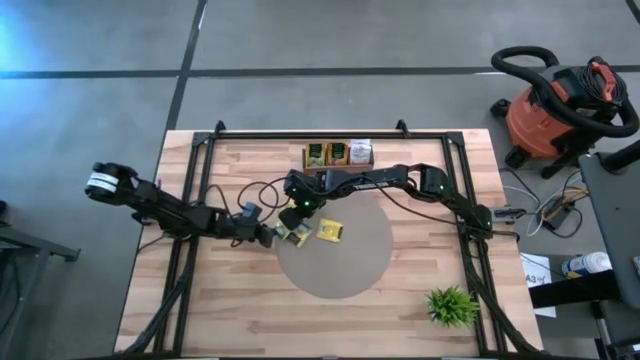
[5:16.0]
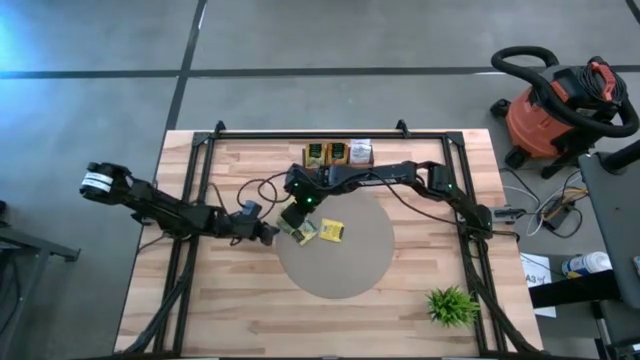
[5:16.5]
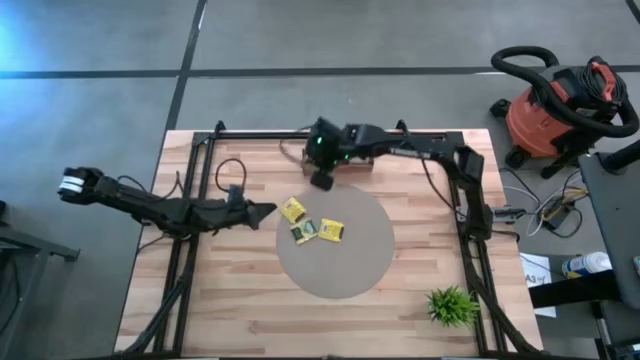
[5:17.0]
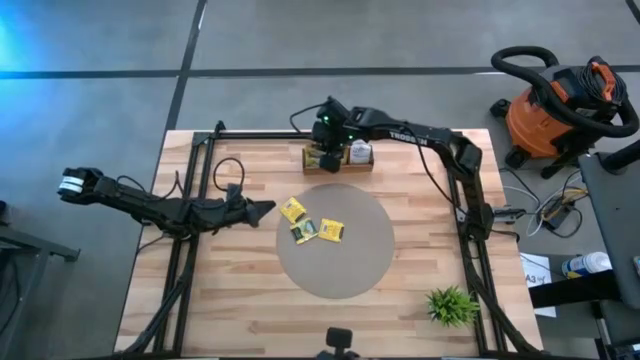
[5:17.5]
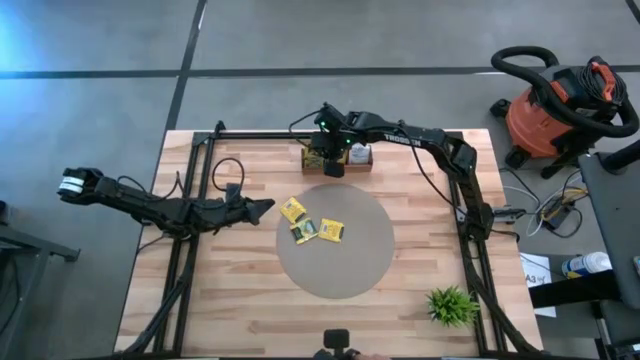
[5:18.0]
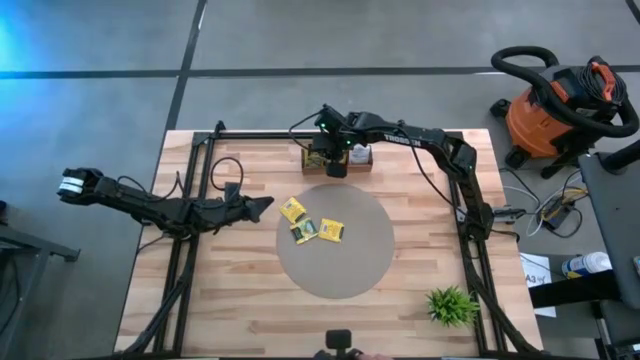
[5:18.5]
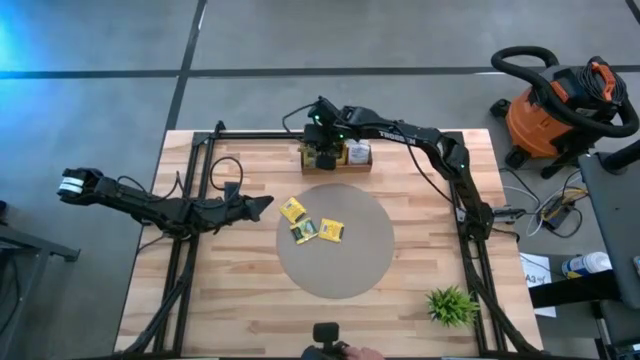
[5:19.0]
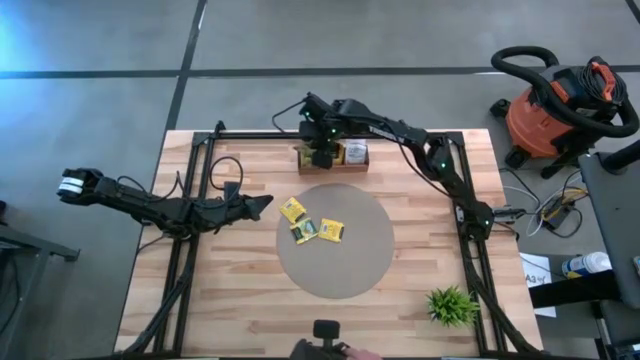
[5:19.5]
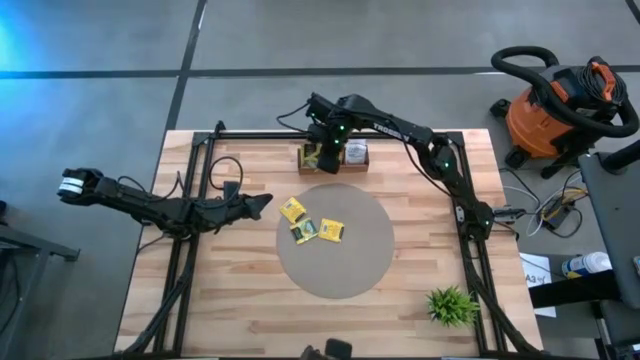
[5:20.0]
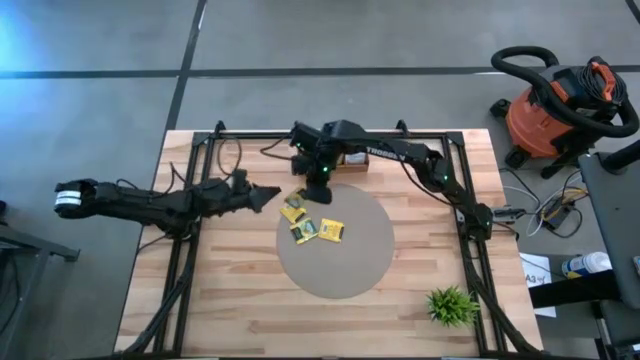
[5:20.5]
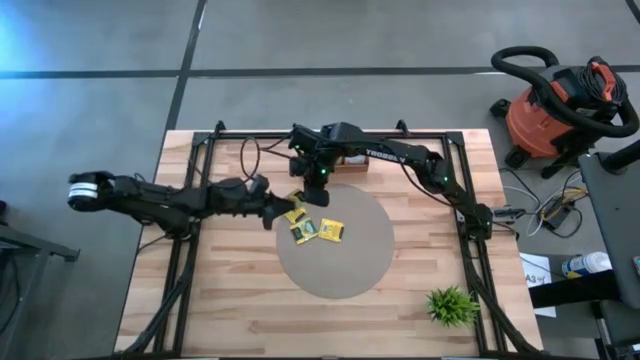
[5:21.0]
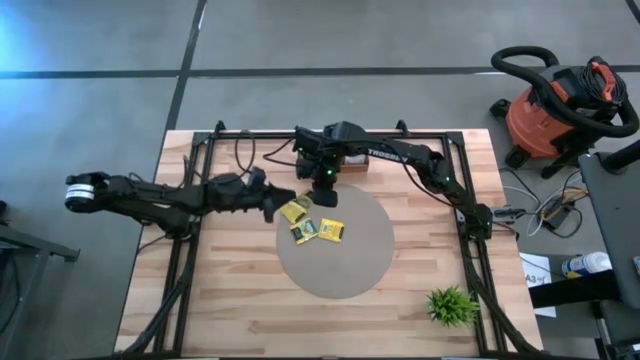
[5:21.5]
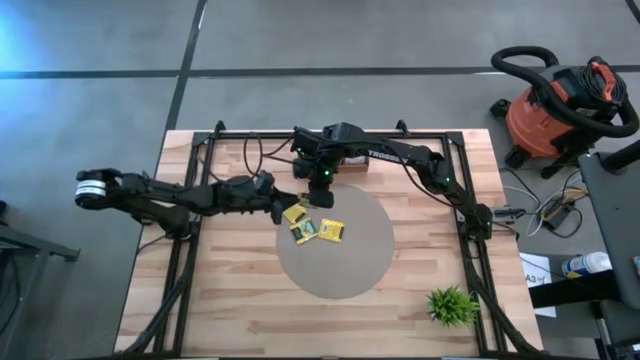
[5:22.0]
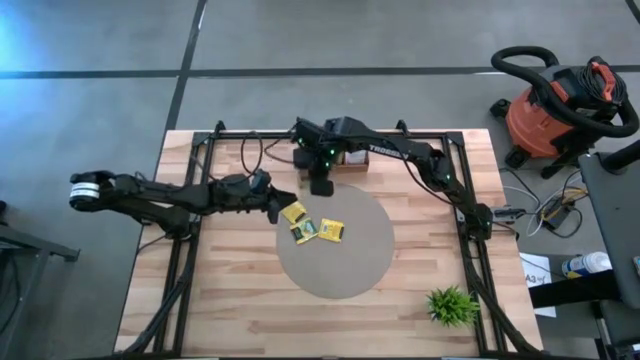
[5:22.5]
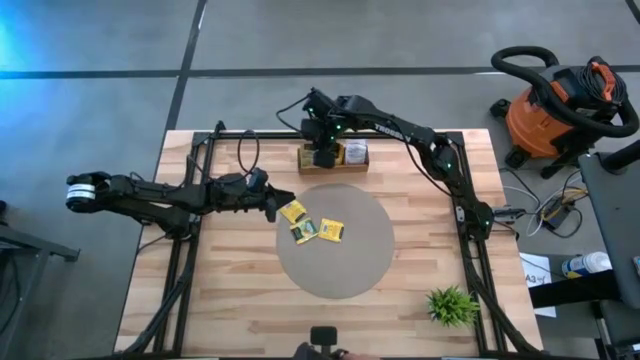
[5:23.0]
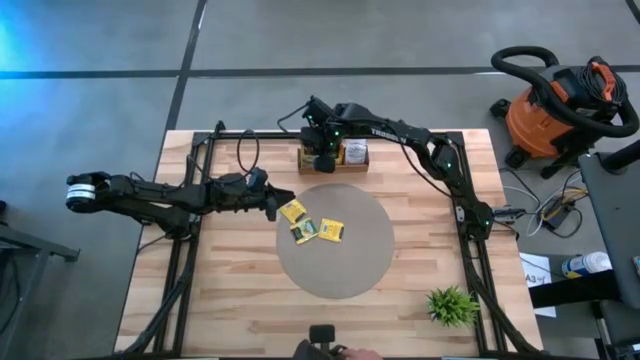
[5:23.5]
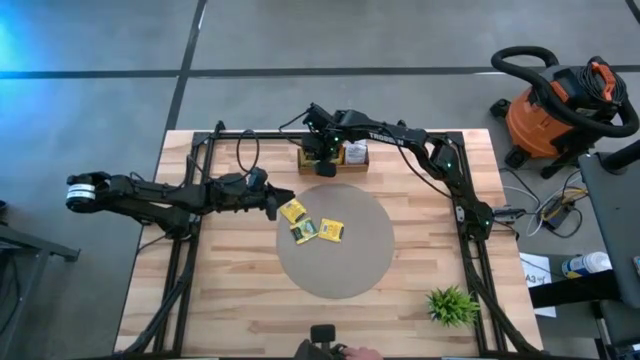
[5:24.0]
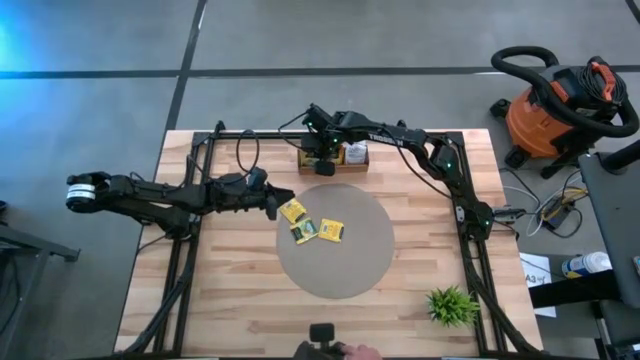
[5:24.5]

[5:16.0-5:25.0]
Task: Pick & Place Tea
Put the yellow tea bag into the left compartment of the wooden organizer

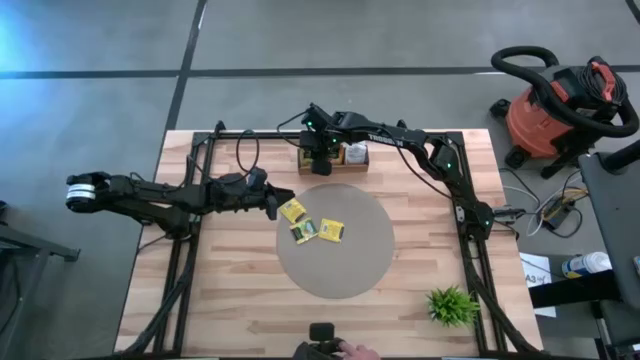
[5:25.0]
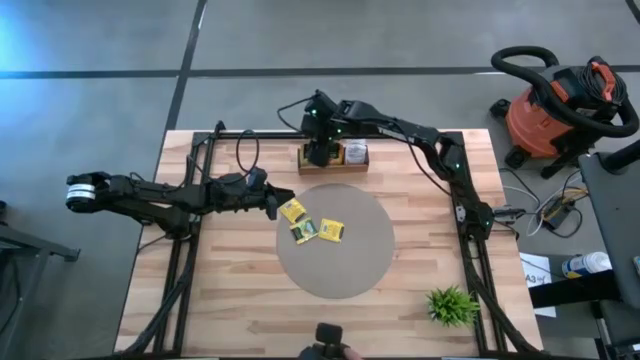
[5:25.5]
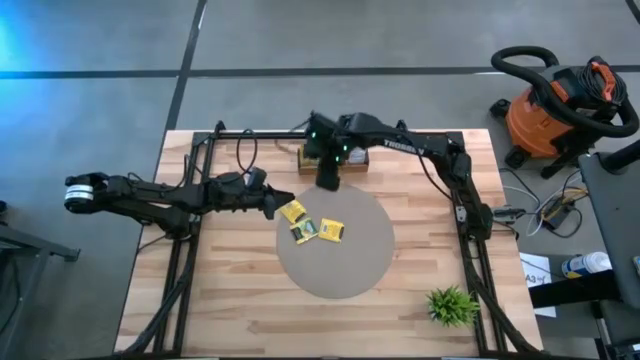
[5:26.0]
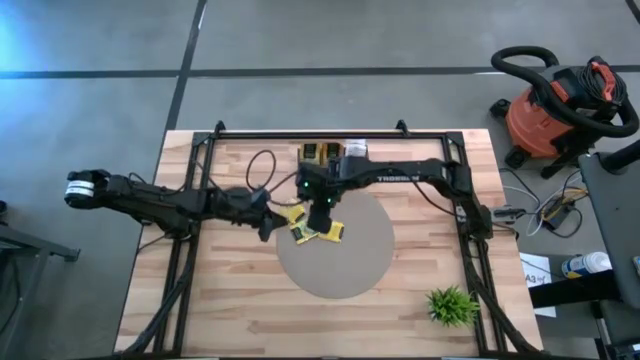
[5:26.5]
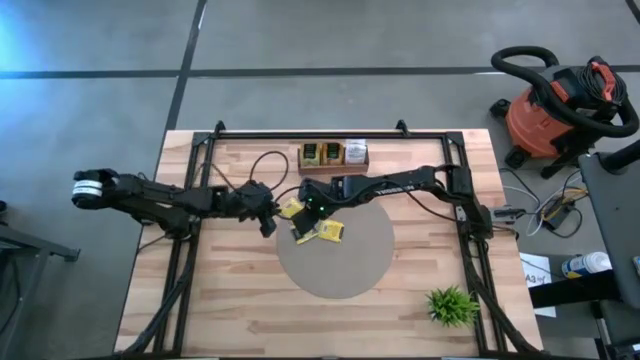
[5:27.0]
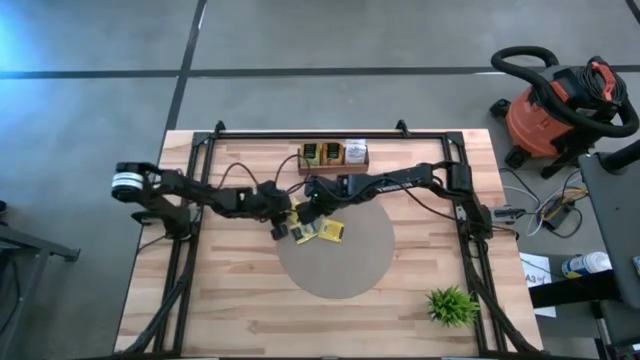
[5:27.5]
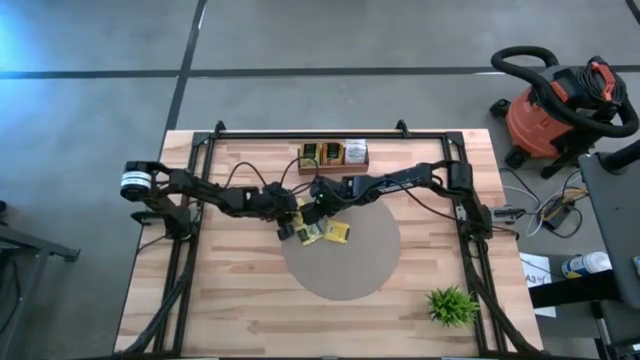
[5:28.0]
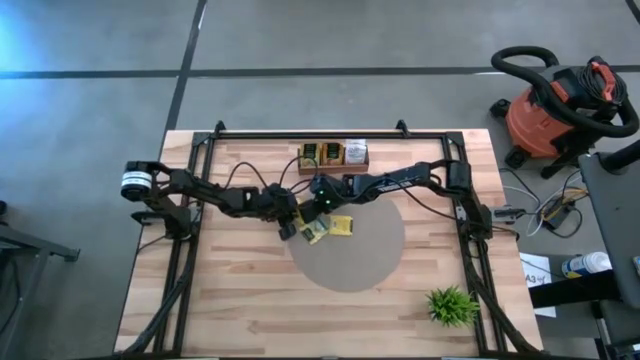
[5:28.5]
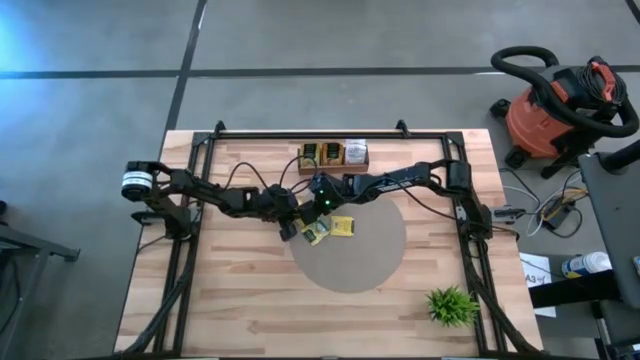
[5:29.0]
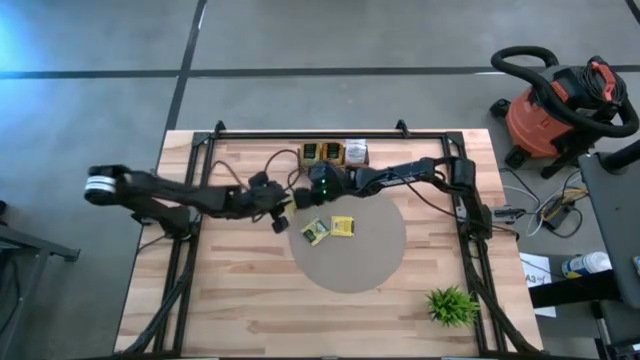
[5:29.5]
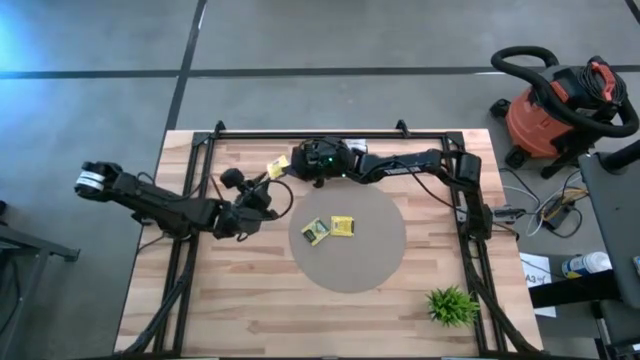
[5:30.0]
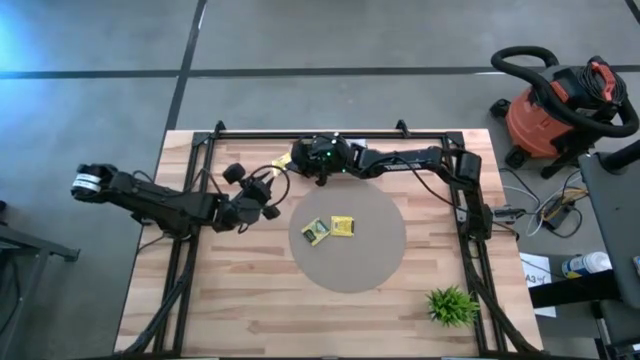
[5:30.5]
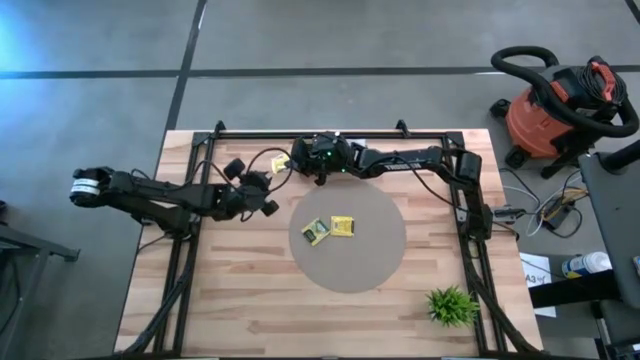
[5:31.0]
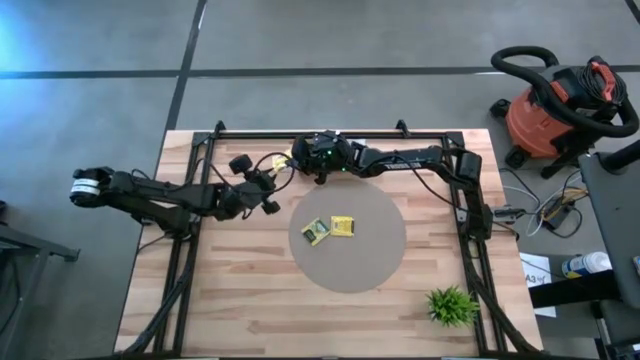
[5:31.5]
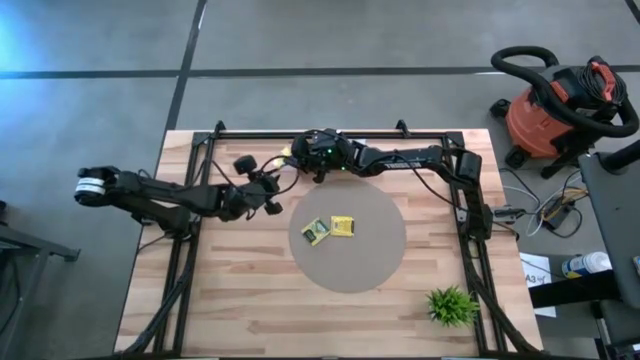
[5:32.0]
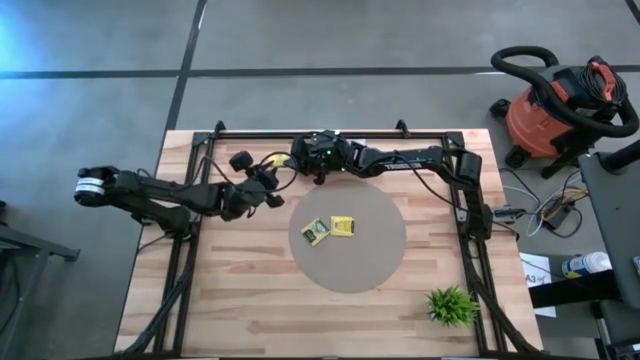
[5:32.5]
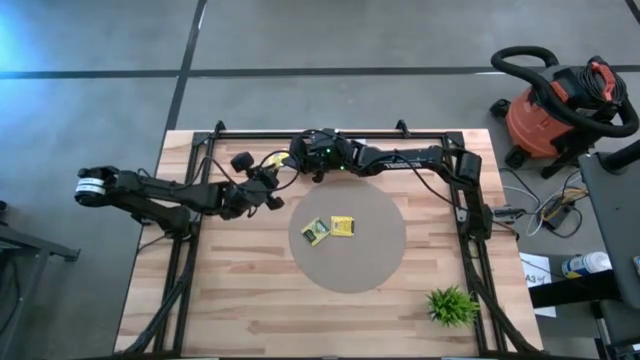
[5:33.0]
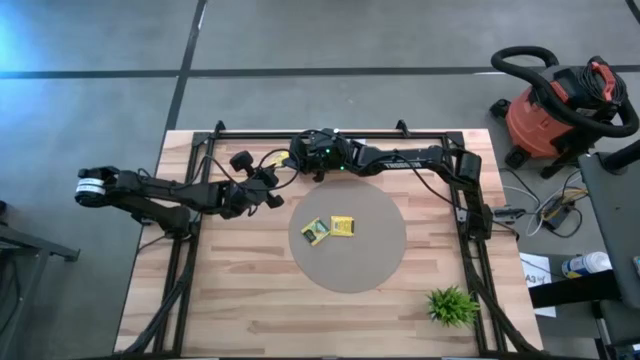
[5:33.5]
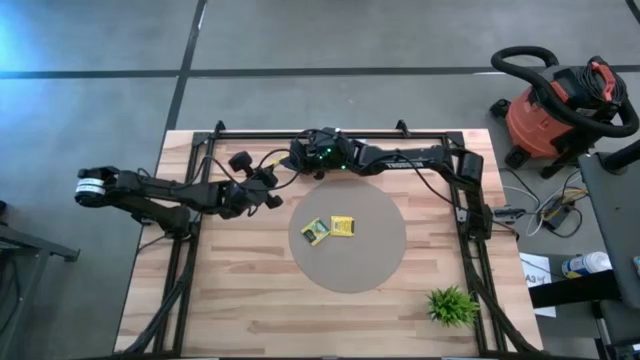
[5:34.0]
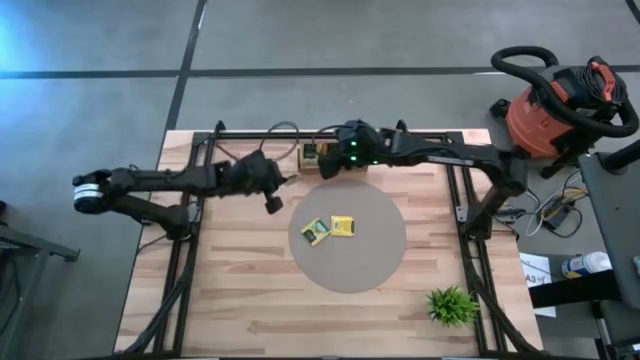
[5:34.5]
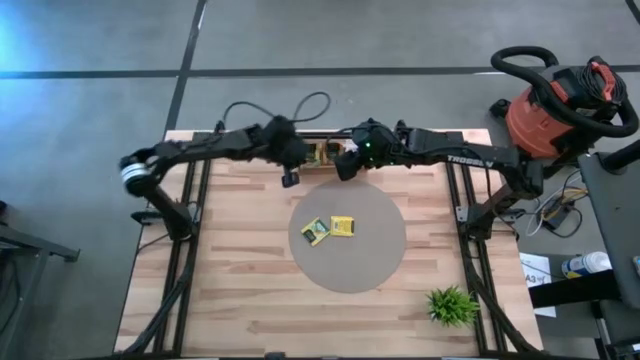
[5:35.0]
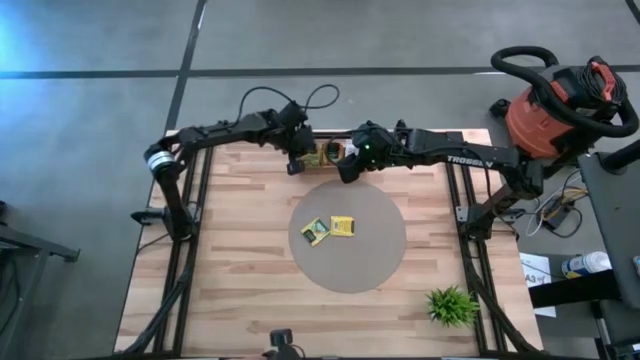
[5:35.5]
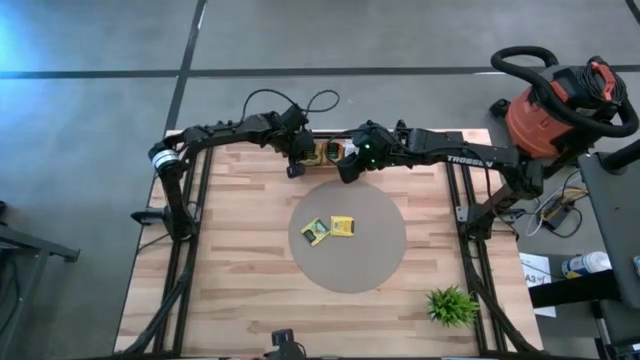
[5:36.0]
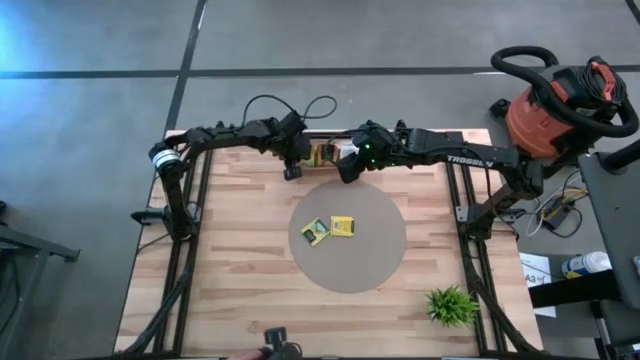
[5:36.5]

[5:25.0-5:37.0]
Put the left yellow tea bag into the left compartment of the wooden organizer
